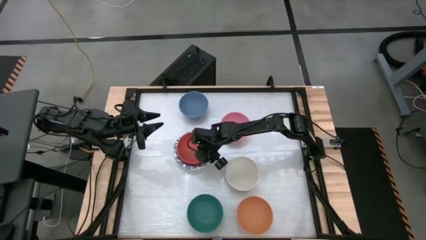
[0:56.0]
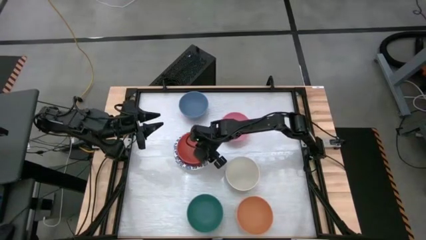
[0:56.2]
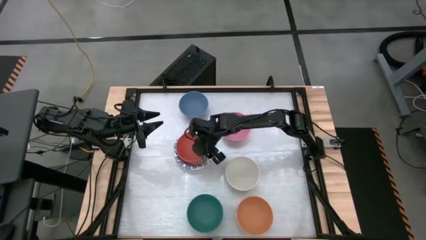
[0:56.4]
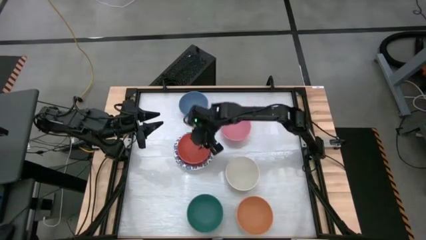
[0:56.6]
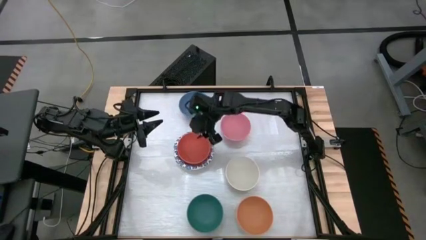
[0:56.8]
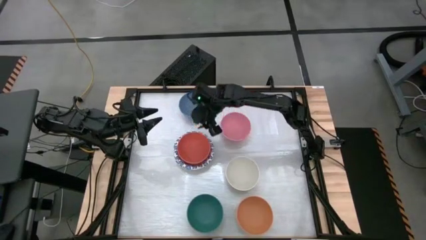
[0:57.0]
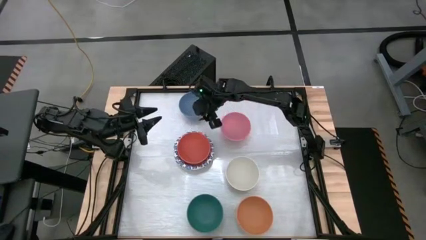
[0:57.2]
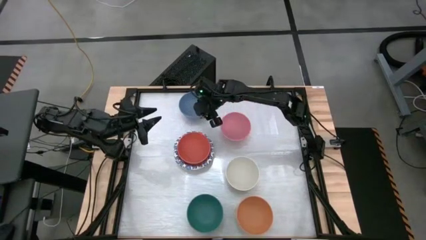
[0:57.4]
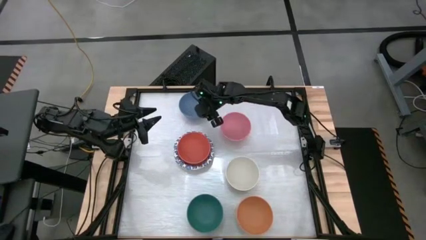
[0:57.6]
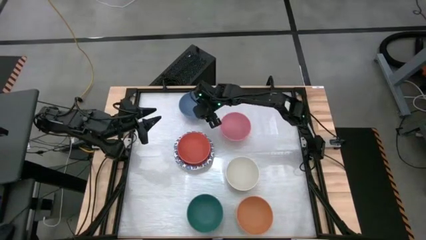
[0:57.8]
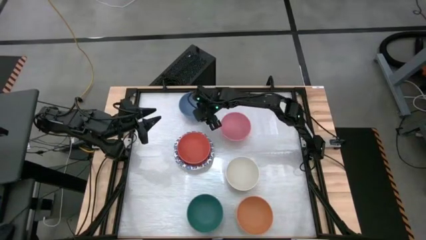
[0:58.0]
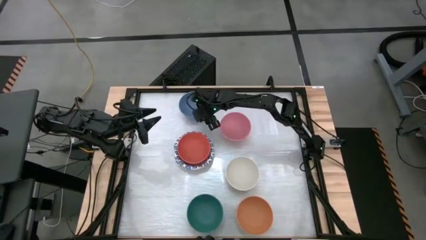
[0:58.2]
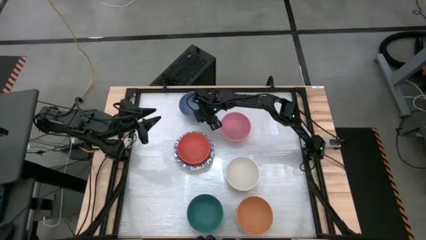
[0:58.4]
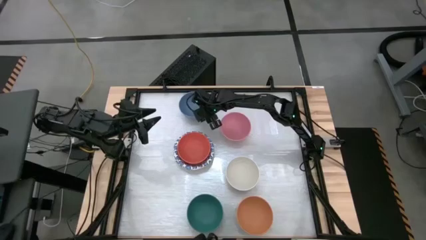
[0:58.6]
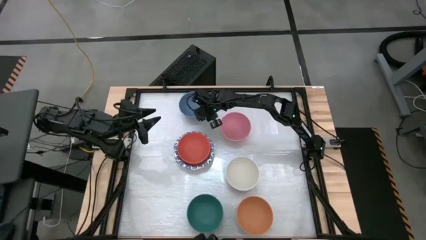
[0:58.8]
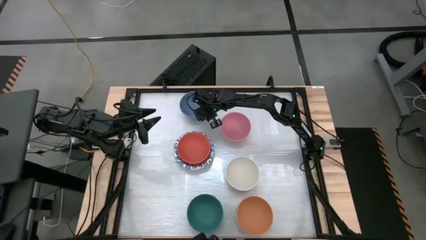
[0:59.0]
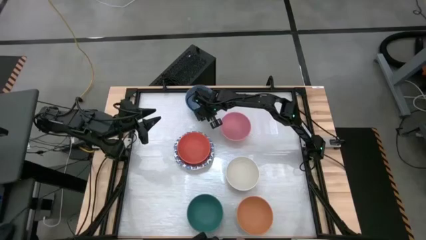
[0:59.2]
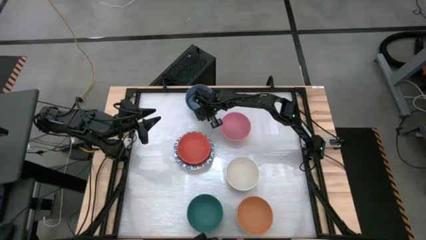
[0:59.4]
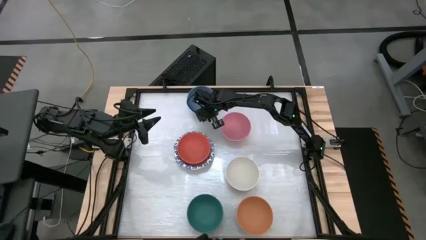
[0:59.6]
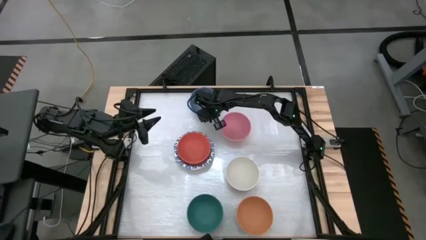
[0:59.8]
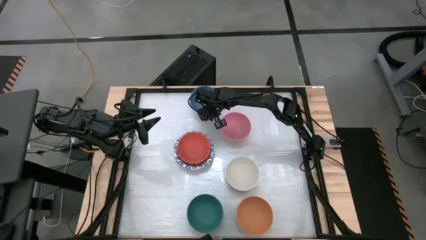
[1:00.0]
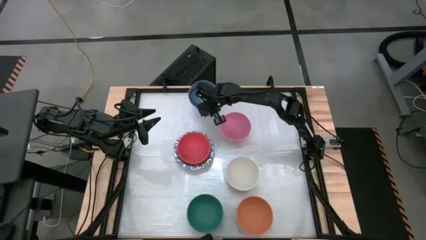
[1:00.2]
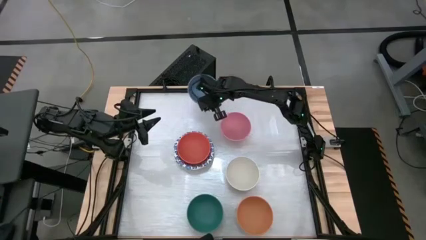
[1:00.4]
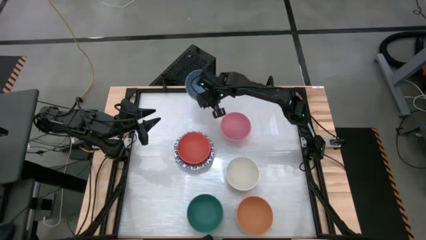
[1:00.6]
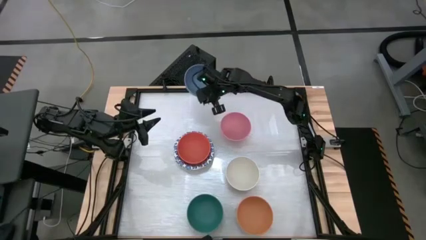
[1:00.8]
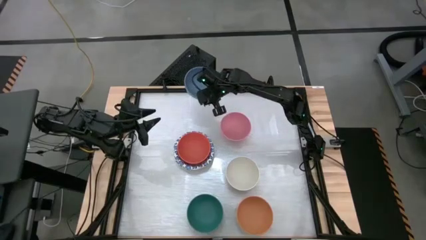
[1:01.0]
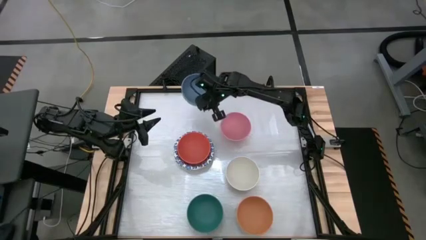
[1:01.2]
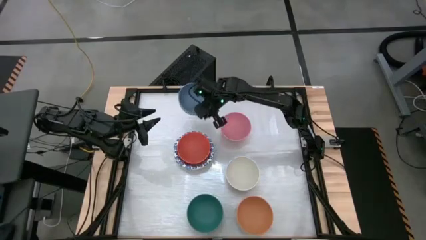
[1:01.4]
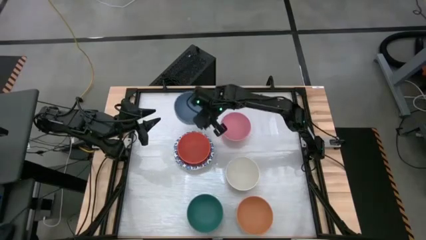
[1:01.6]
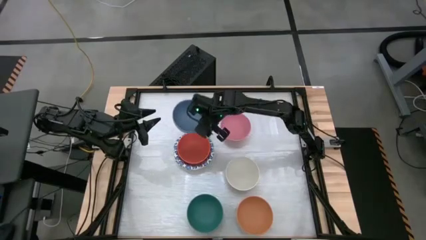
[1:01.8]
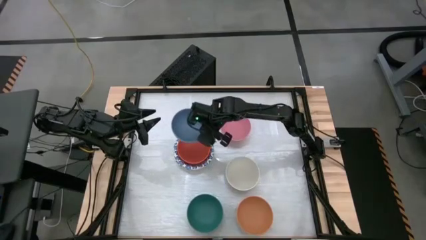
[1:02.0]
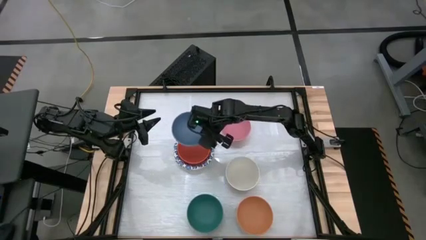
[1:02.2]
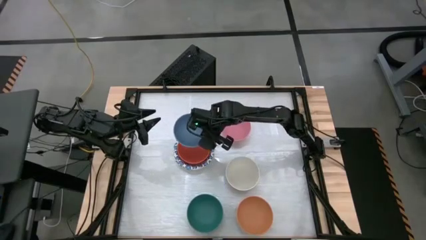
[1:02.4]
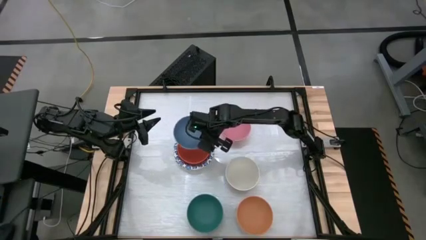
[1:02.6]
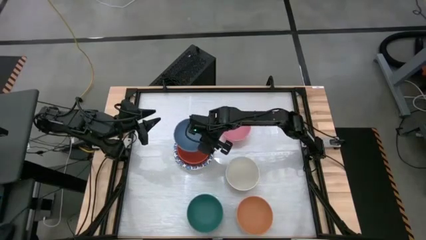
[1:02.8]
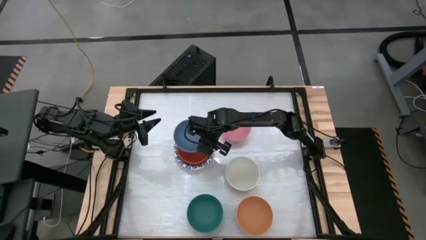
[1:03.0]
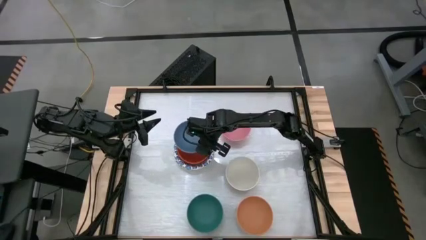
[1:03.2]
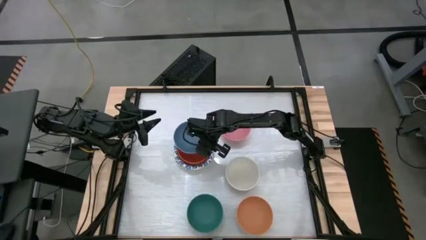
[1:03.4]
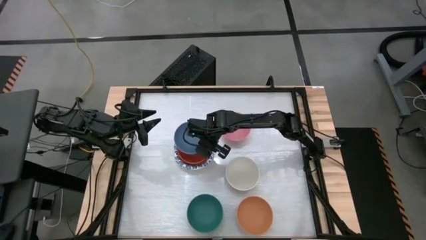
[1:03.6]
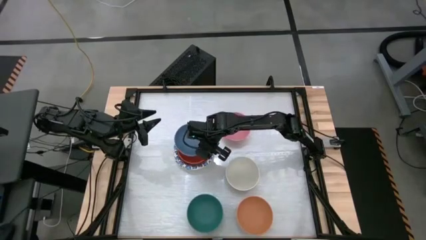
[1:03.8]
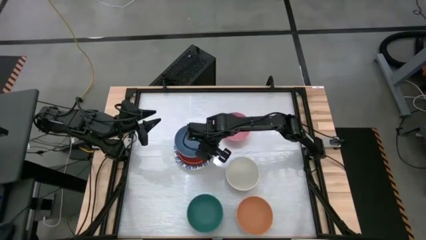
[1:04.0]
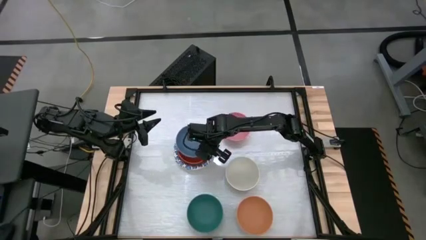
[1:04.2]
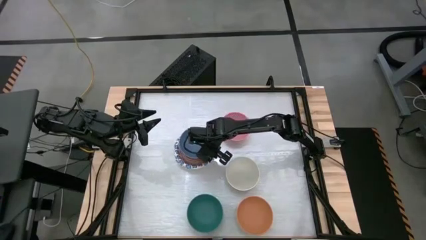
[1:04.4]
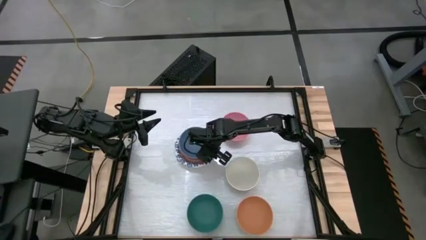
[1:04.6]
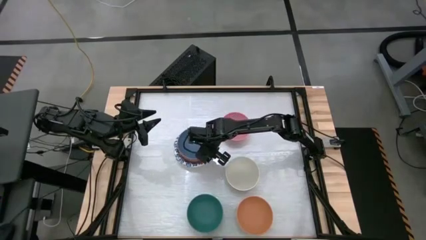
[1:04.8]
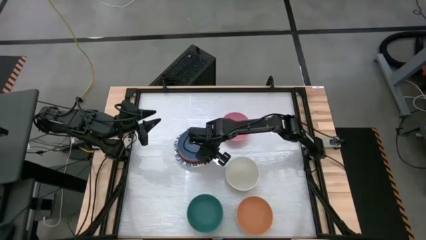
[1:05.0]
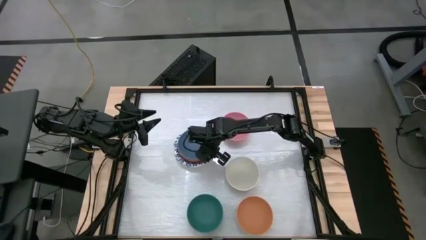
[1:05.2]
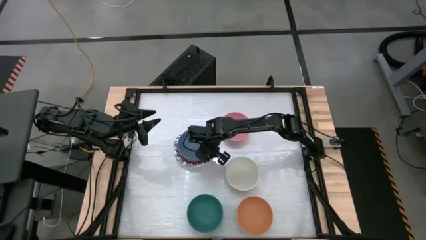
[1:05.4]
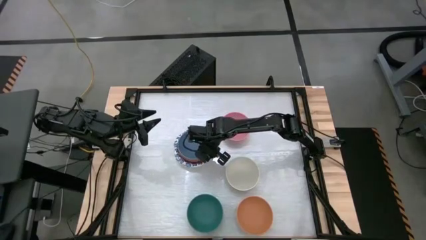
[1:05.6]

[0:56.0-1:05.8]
Stack the blue bowl on top of the red bowl
